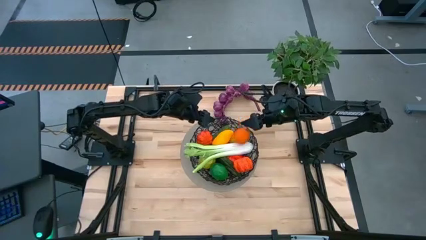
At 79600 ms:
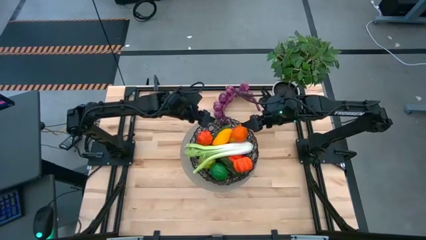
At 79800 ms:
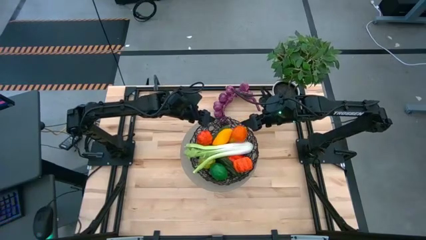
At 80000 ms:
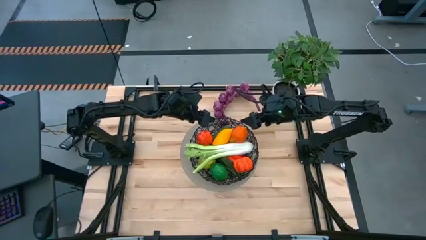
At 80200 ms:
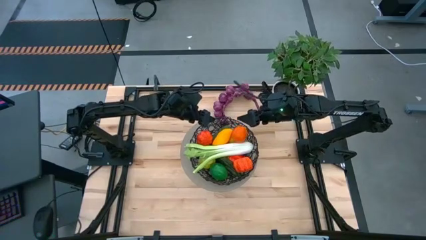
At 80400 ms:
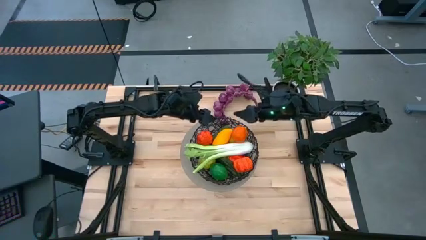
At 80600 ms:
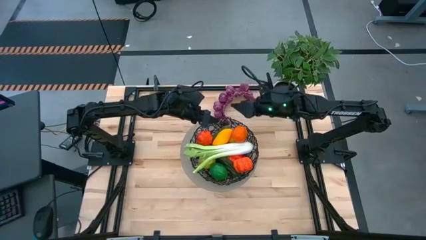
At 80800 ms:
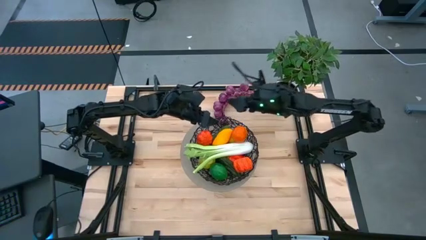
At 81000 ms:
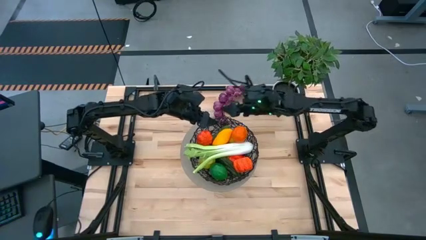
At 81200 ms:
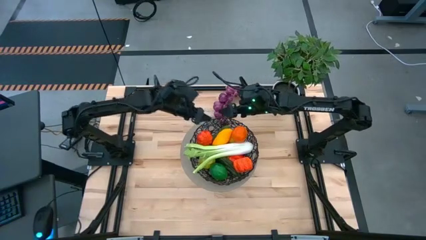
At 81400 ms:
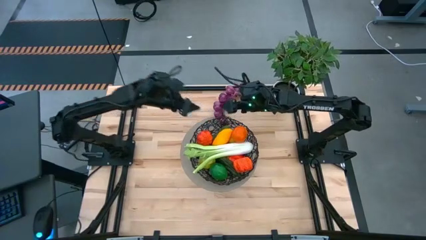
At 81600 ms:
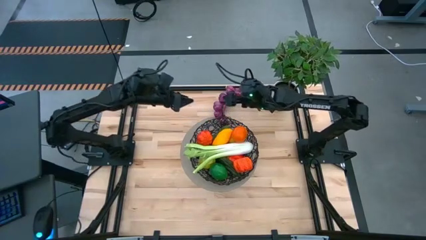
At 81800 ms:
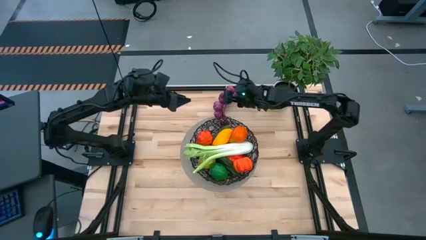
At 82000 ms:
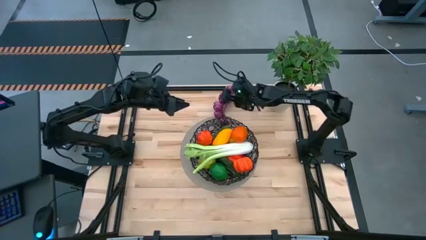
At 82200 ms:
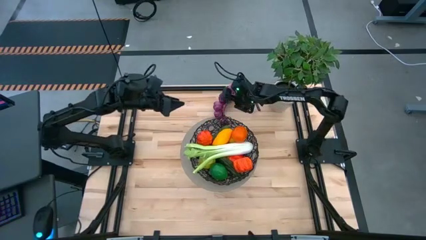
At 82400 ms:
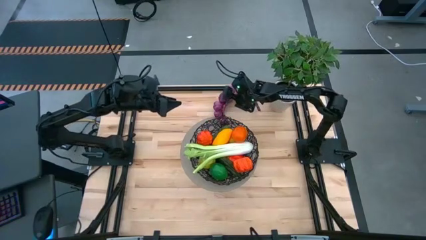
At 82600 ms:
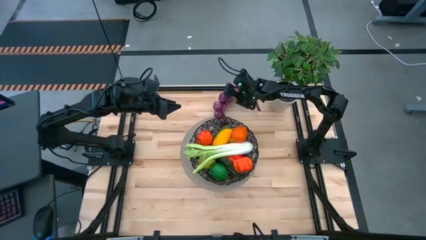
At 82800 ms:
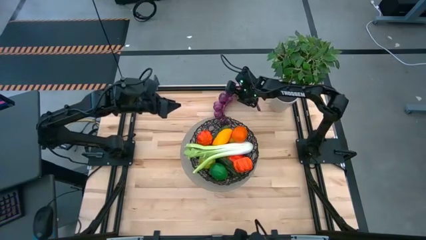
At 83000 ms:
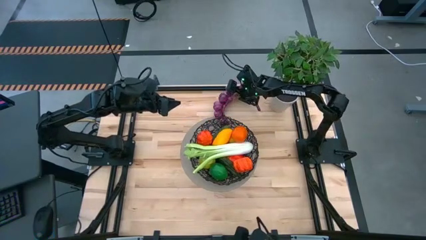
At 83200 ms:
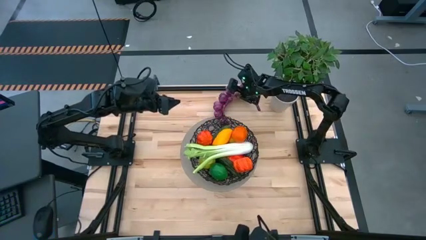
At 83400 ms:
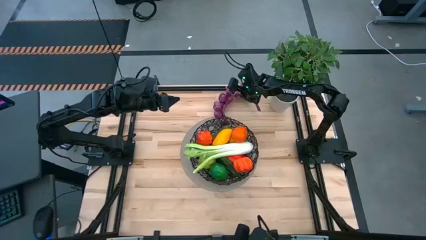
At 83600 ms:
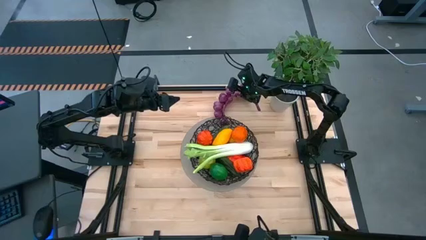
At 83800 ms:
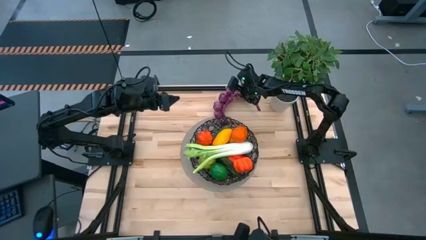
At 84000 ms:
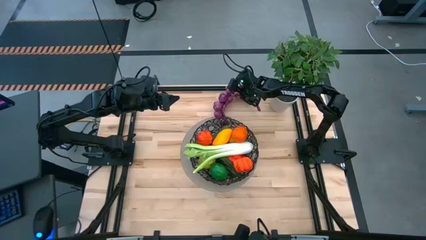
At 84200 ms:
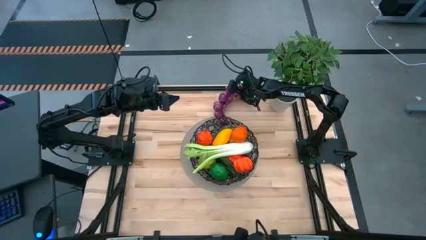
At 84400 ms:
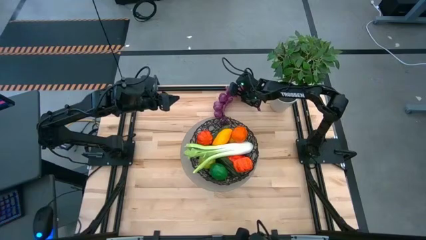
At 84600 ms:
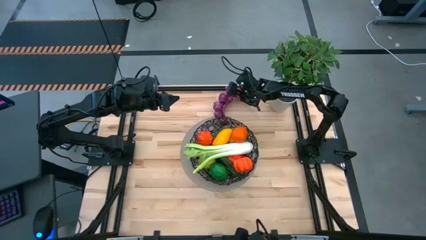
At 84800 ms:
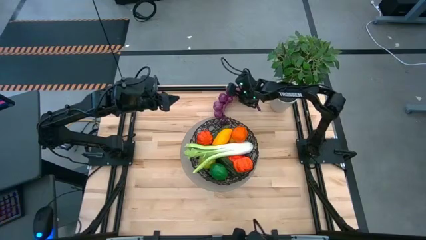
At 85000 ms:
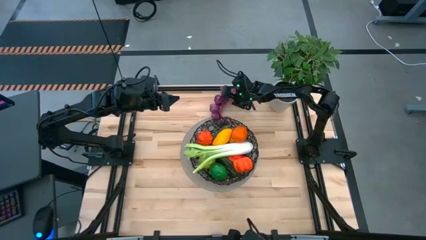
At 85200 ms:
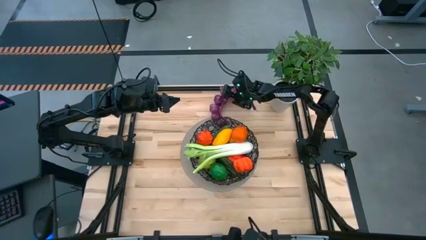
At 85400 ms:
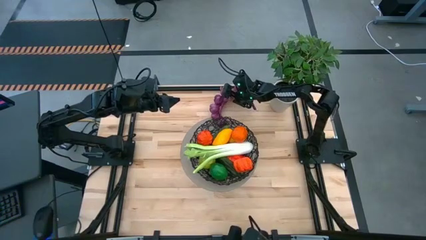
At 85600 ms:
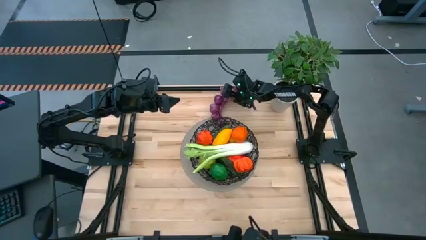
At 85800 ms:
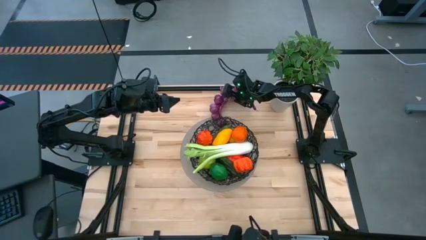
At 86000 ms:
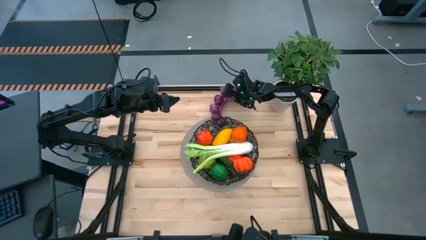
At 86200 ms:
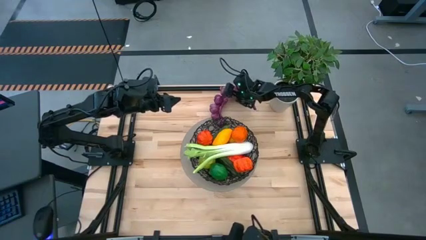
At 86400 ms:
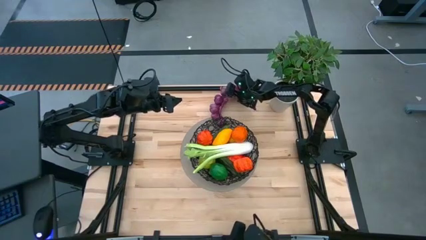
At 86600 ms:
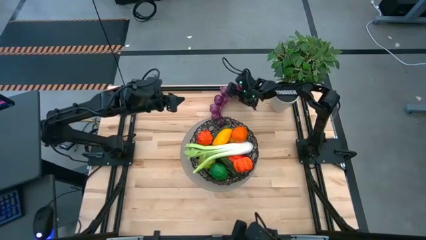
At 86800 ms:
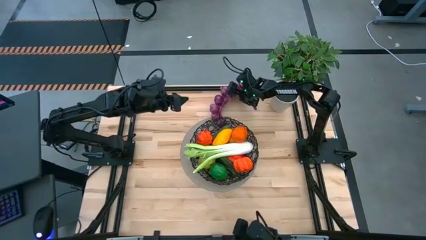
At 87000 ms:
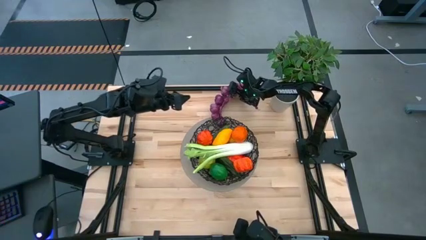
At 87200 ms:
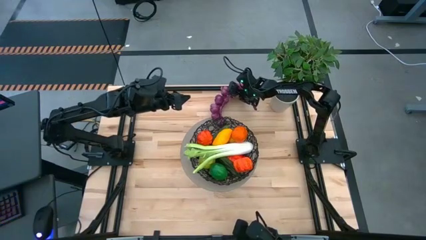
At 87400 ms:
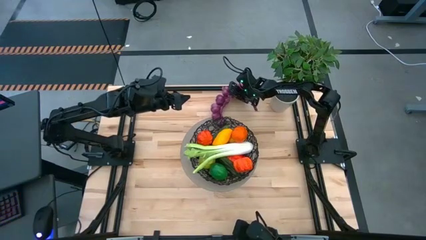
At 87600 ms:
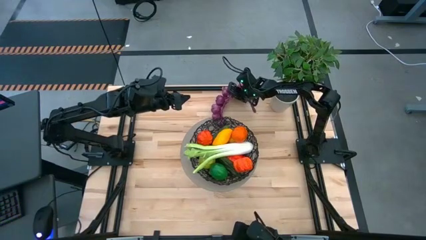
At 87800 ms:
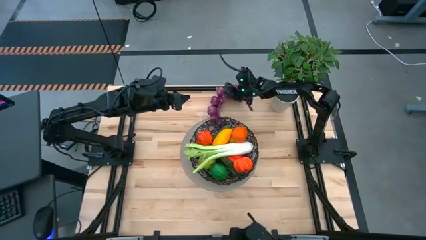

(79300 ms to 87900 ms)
Task: Build produce basket
Put the purple garlic into the black wire basket

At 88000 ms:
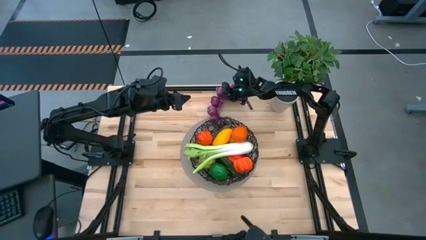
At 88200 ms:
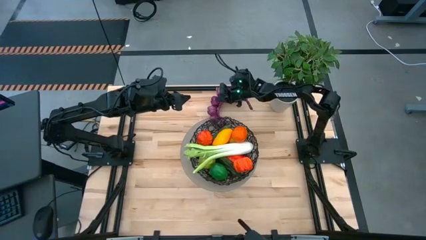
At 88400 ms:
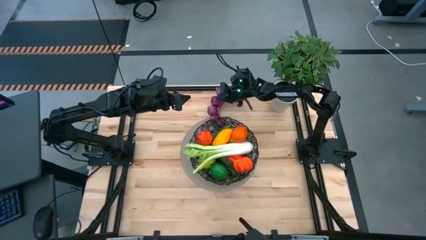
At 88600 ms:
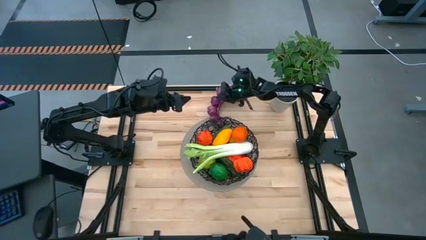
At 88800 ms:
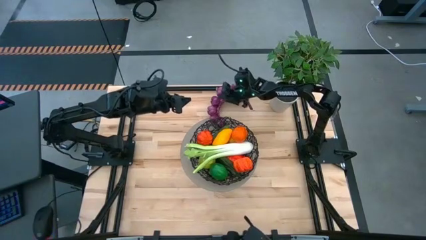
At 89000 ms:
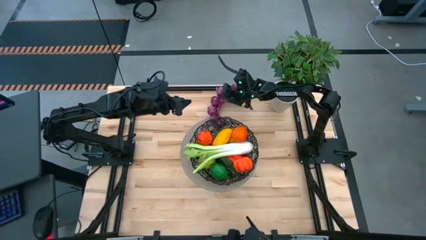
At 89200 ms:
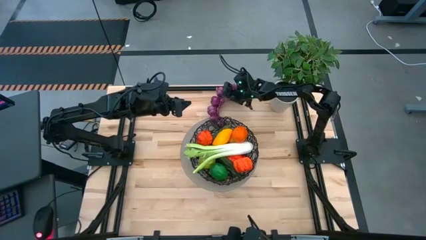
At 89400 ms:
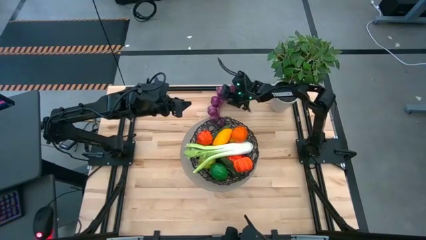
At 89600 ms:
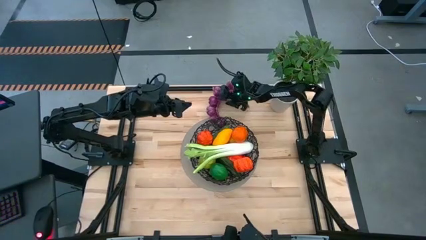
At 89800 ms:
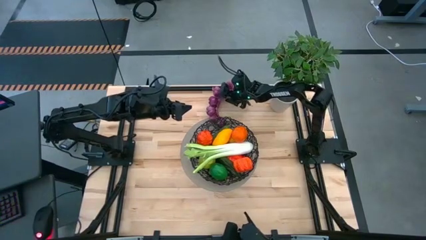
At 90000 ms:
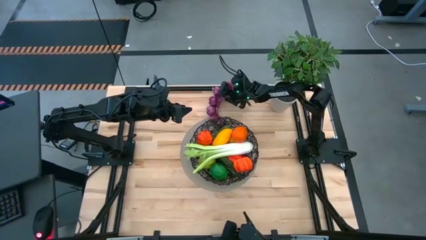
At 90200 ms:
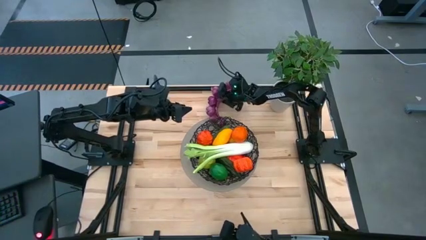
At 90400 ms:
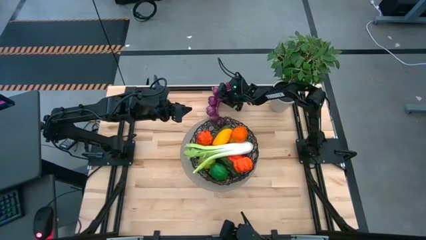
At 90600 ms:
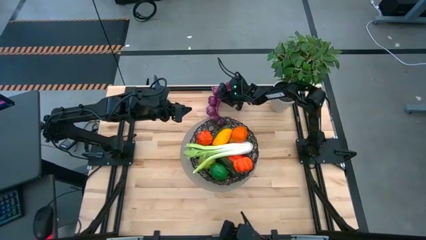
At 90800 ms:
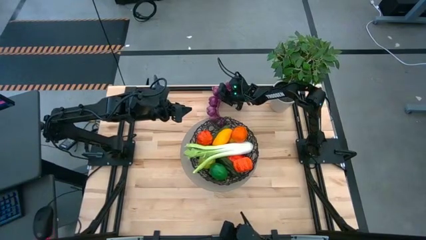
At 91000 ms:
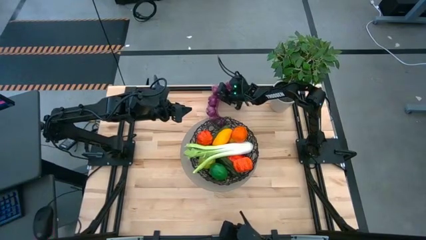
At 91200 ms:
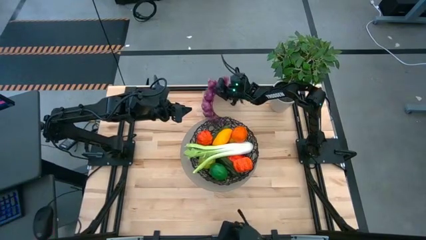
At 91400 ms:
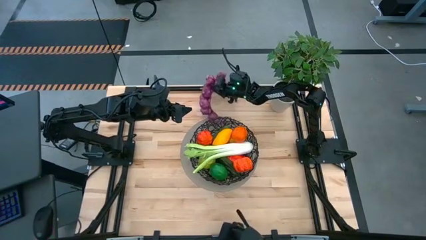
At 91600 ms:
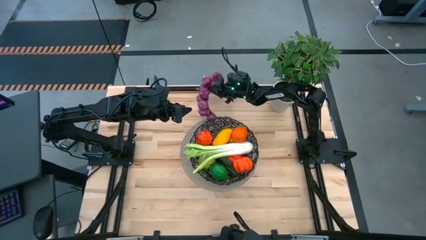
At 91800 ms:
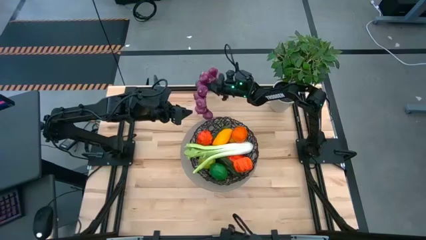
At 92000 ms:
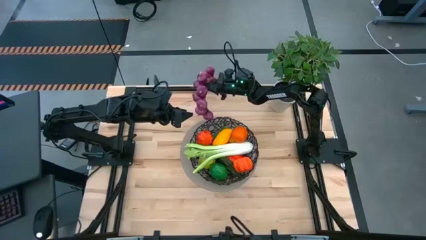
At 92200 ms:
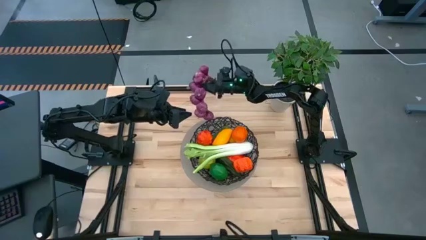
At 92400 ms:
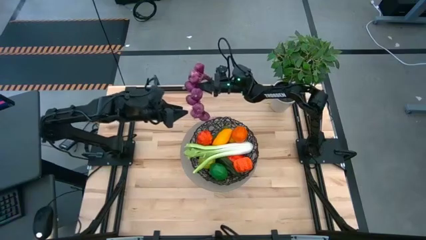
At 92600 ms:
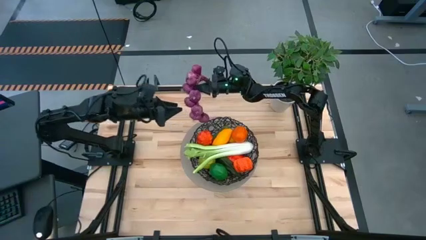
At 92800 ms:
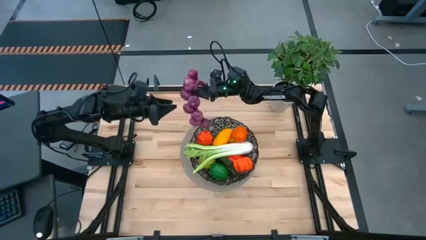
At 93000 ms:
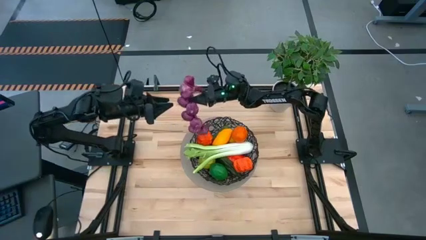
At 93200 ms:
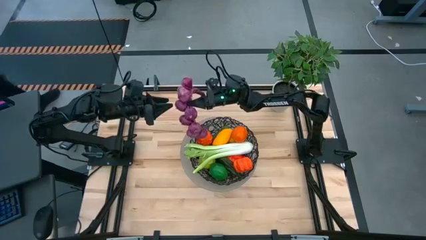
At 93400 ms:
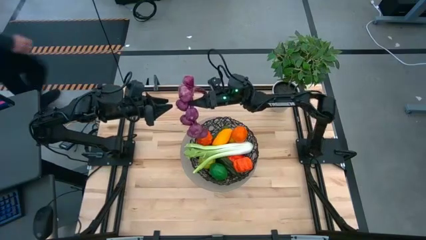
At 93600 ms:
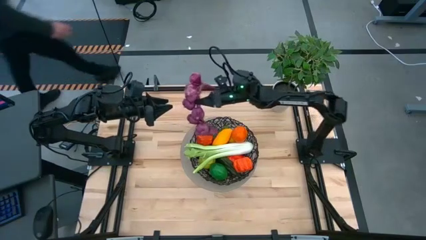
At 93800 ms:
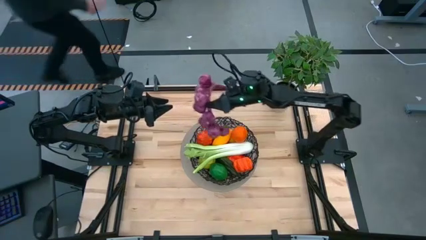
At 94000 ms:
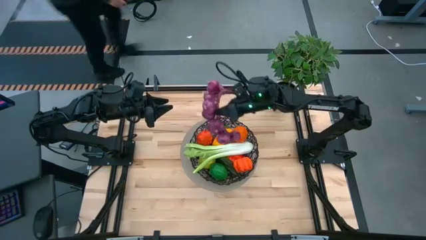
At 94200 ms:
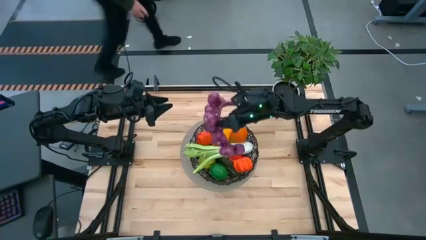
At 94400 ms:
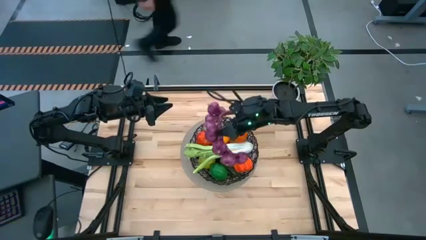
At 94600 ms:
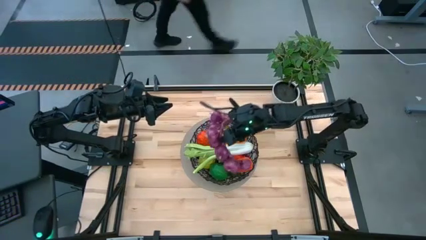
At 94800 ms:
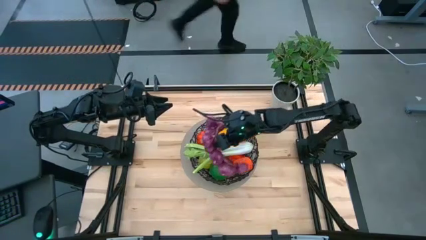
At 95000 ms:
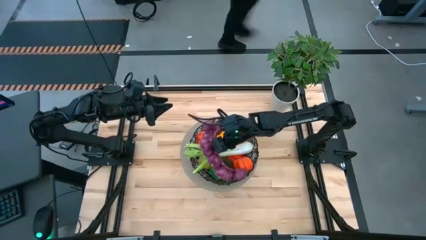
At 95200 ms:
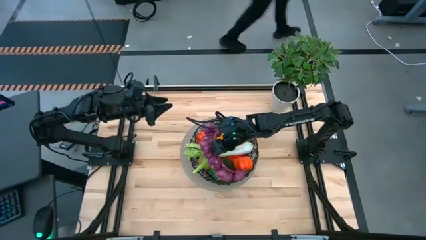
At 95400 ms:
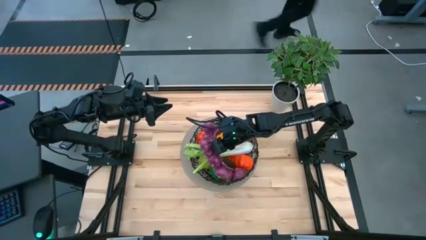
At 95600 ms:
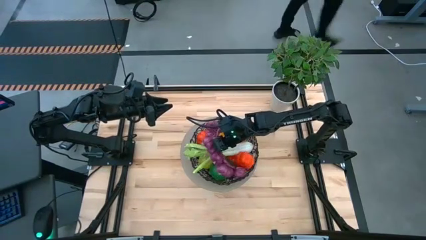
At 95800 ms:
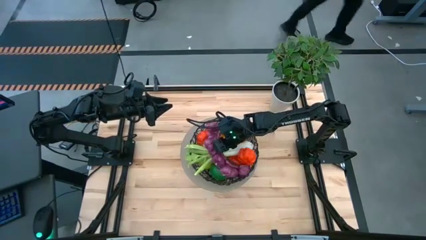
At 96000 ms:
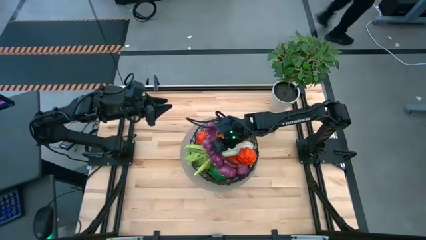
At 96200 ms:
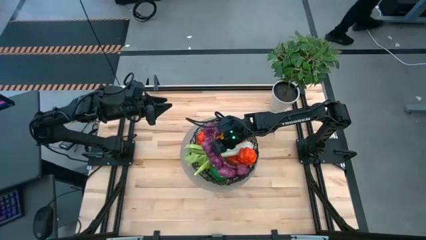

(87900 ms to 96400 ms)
Put the purple garlic into the black wire basket
